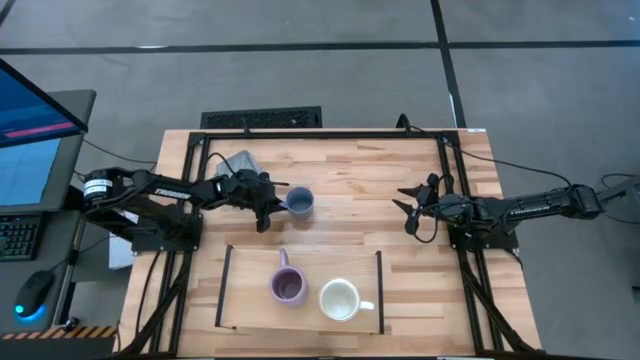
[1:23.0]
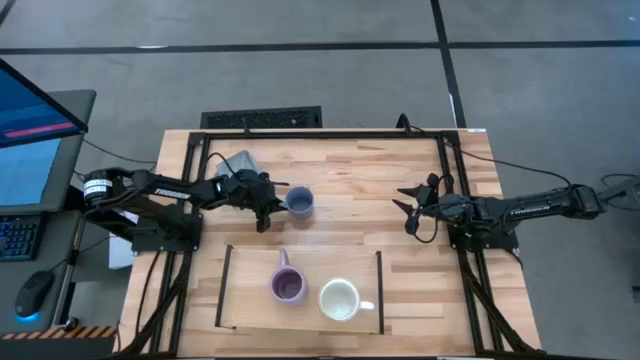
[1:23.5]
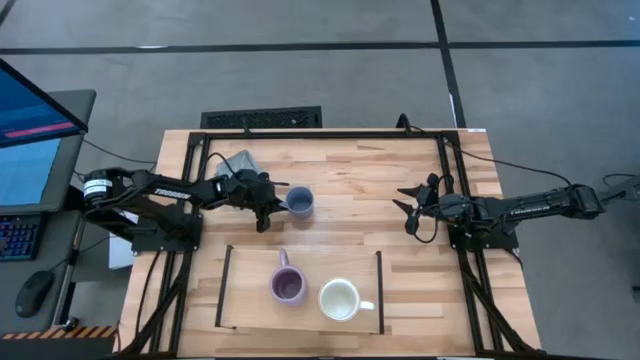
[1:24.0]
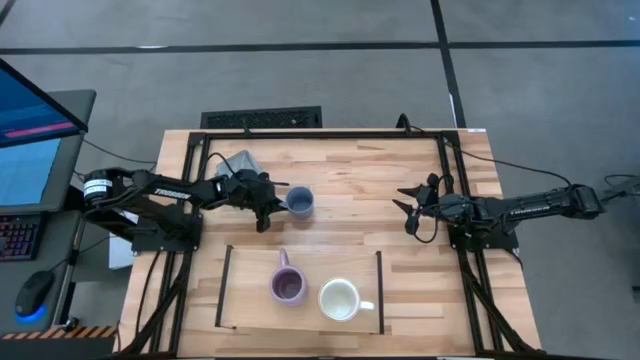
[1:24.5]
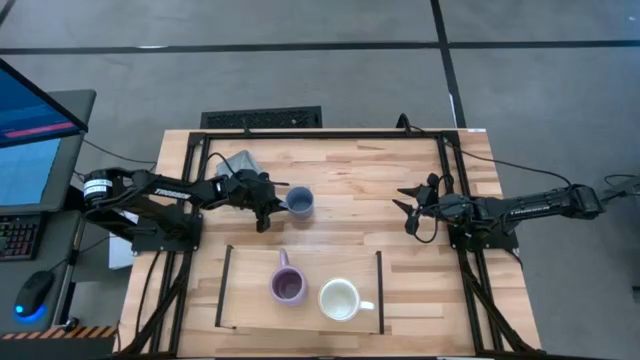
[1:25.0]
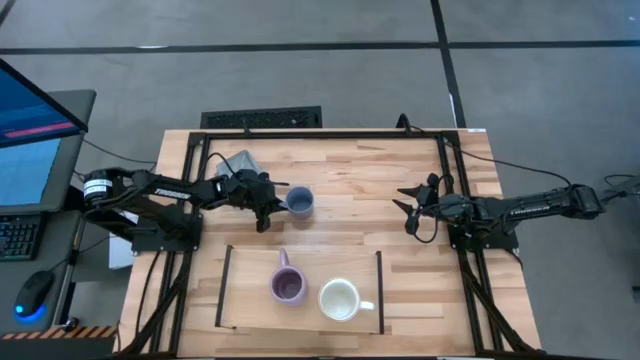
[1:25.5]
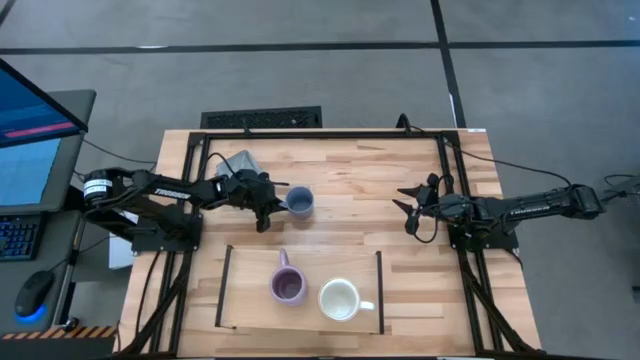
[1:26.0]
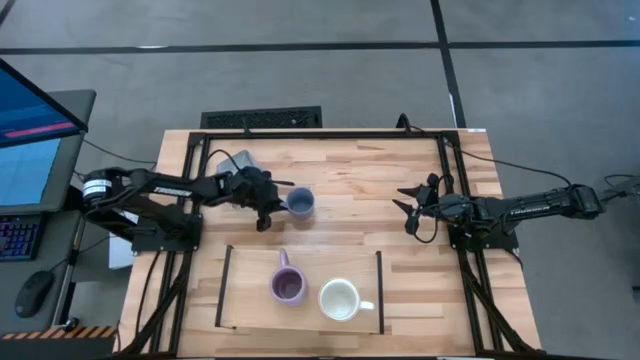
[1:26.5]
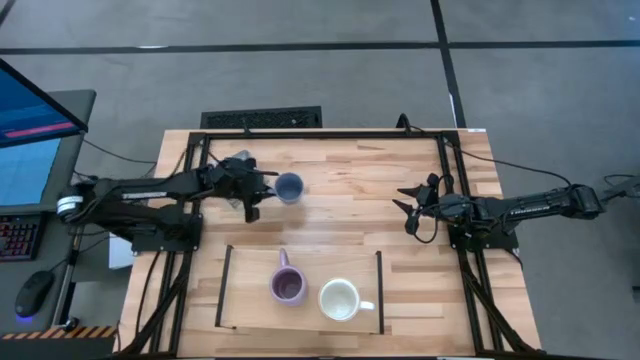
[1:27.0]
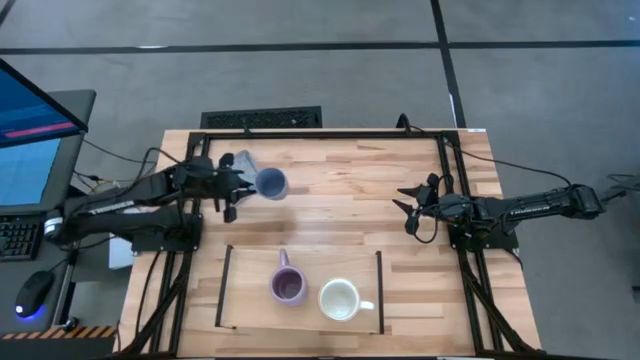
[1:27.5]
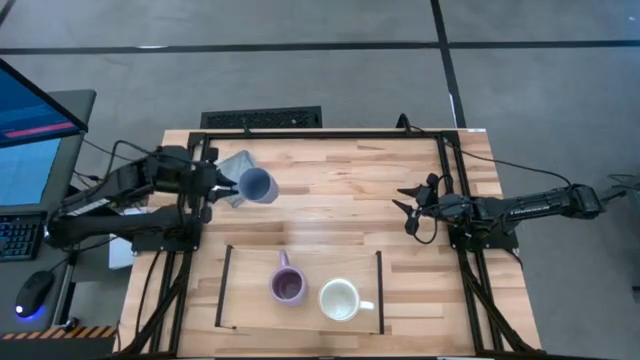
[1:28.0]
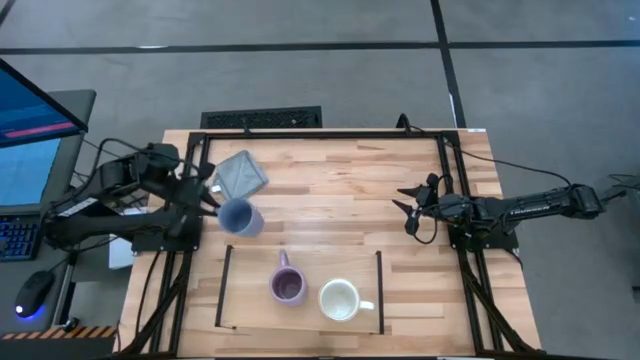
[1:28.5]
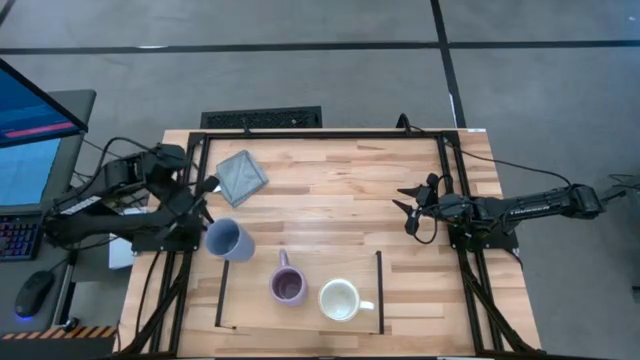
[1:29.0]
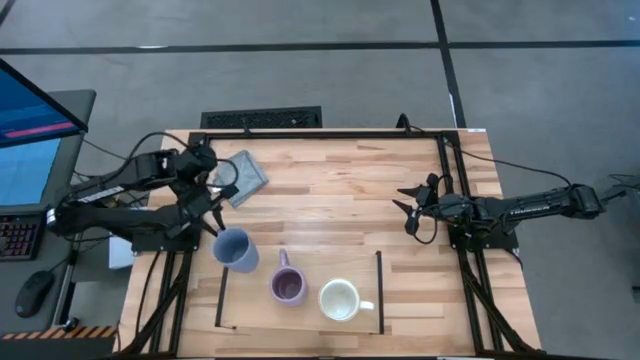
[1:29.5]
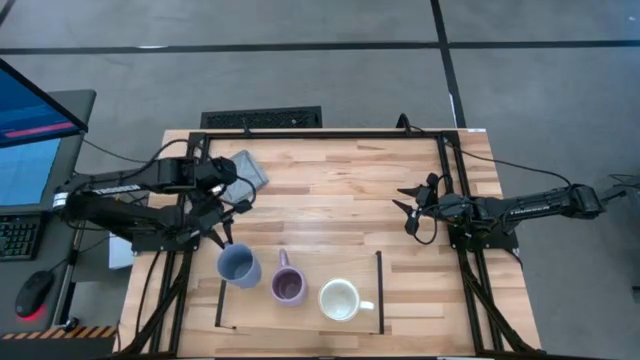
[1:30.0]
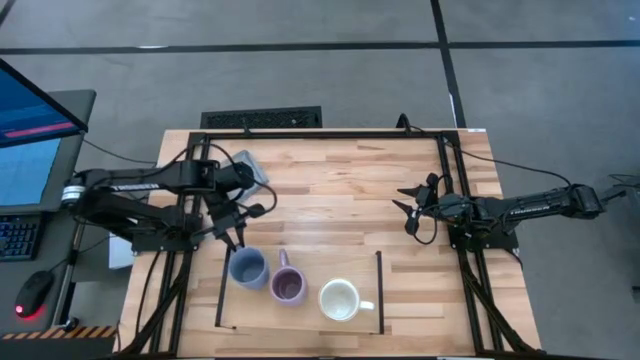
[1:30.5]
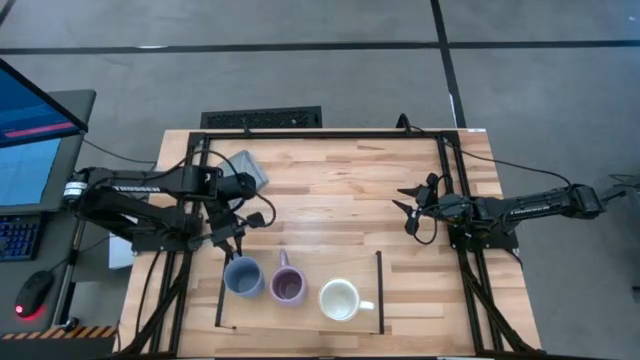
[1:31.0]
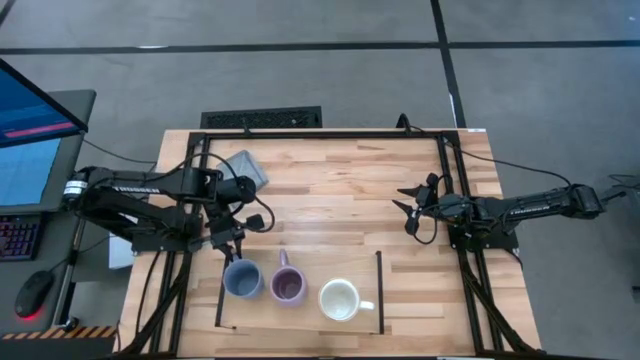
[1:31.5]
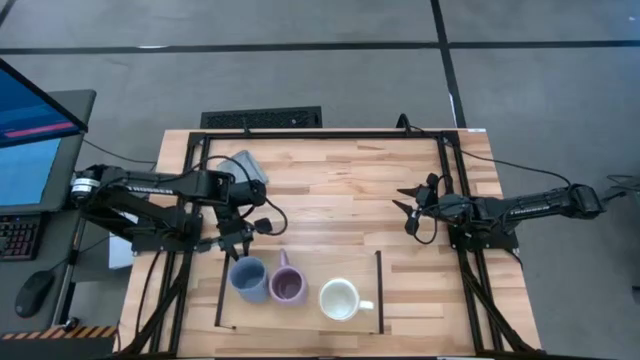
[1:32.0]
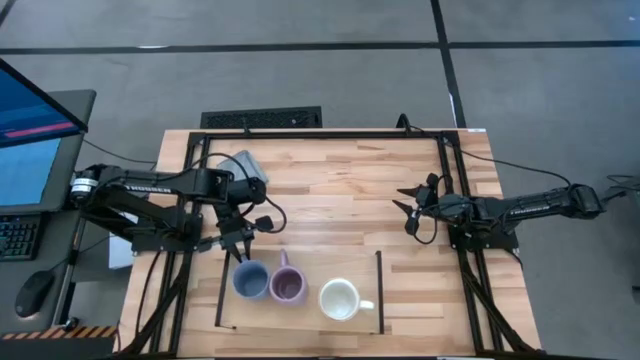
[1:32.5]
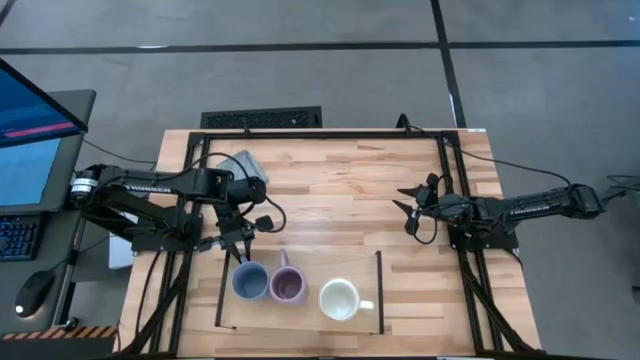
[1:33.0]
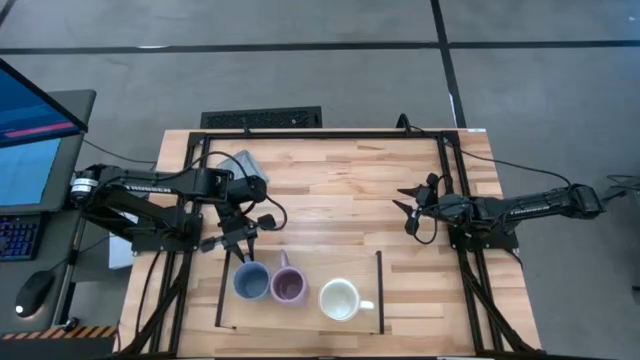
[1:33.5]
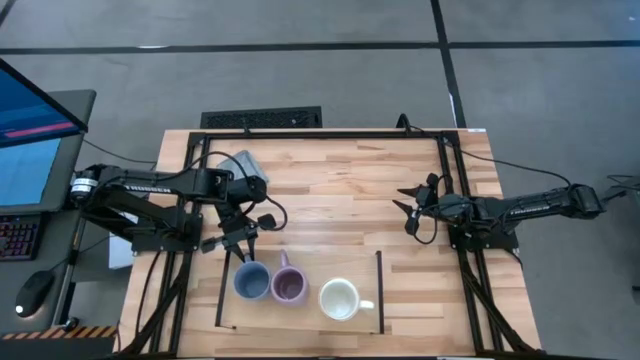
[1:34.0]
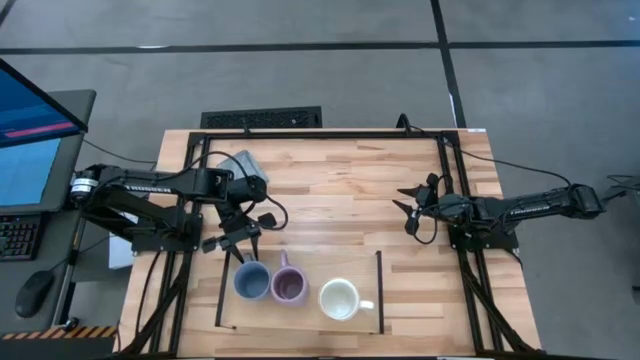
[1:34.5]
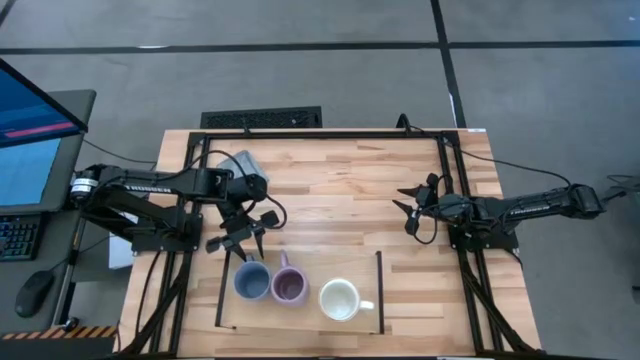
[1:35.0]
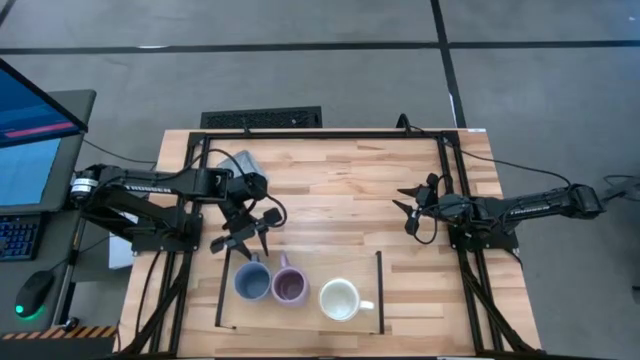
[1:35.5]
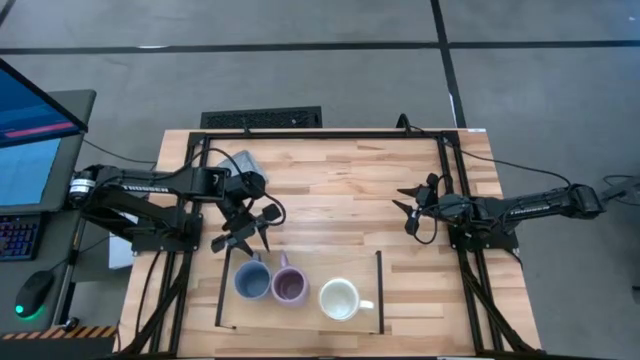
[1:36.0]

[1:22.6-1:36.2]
Task: Stack small to large cups/mugs on shelf
Put the blue mug on the shelf

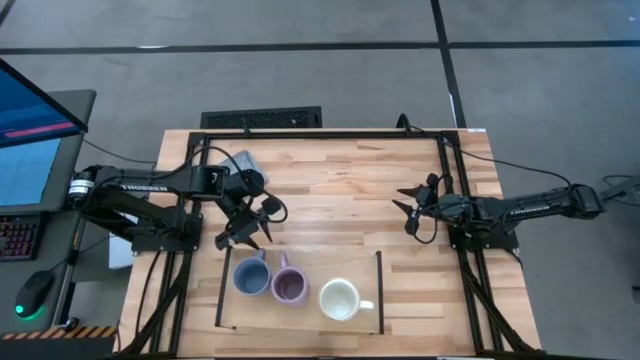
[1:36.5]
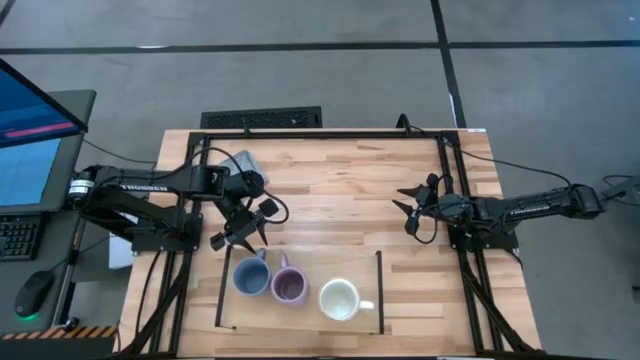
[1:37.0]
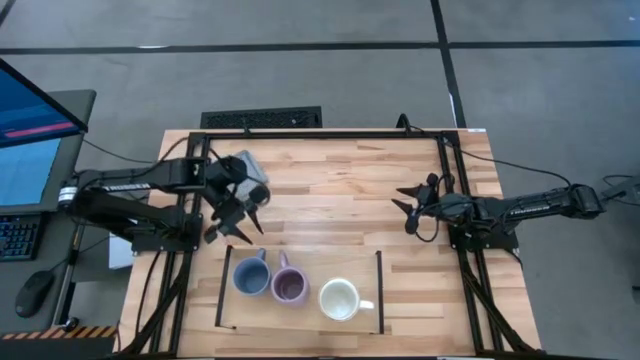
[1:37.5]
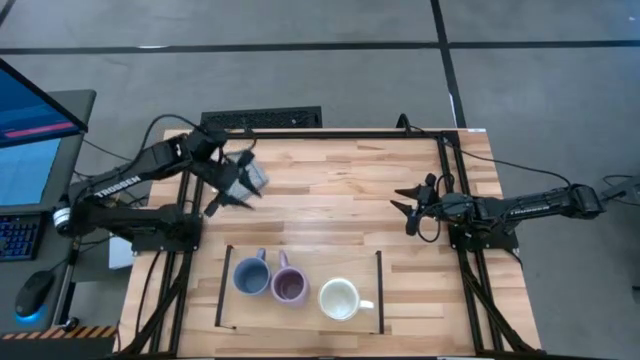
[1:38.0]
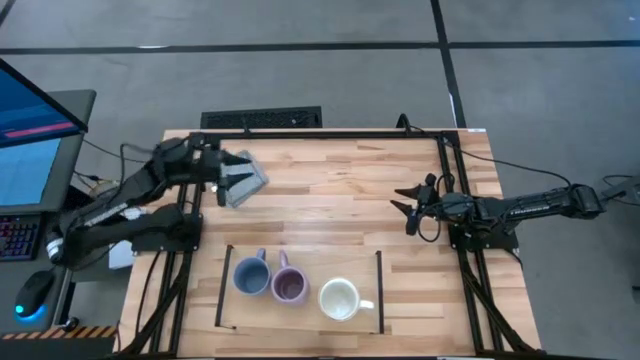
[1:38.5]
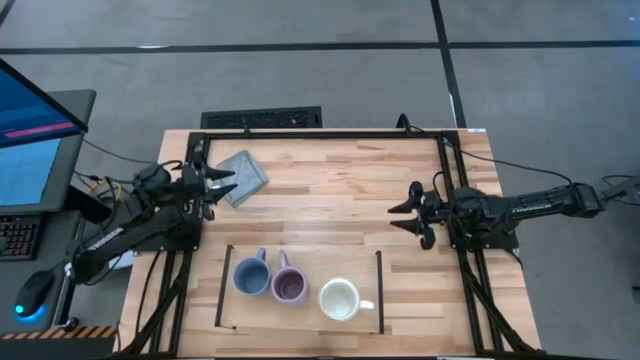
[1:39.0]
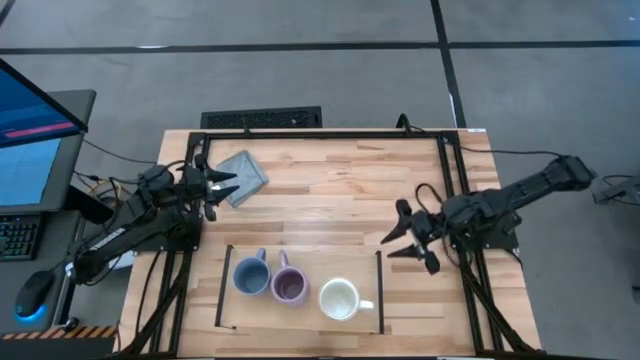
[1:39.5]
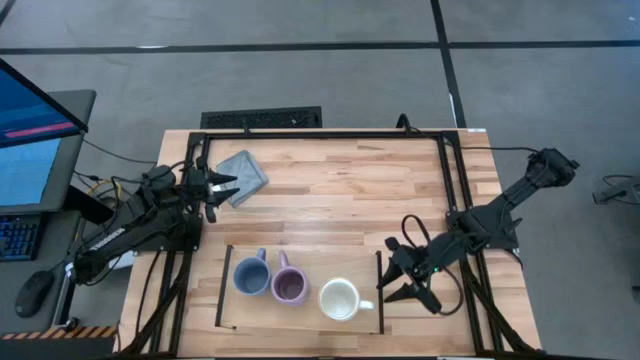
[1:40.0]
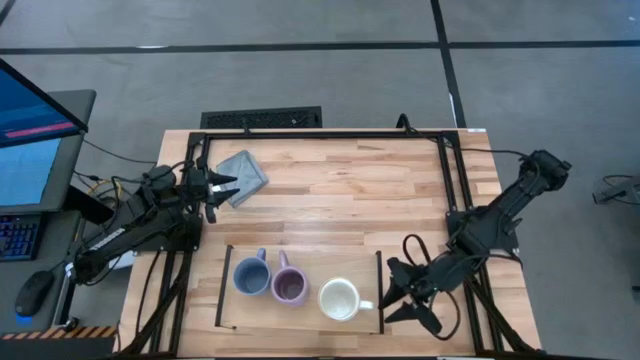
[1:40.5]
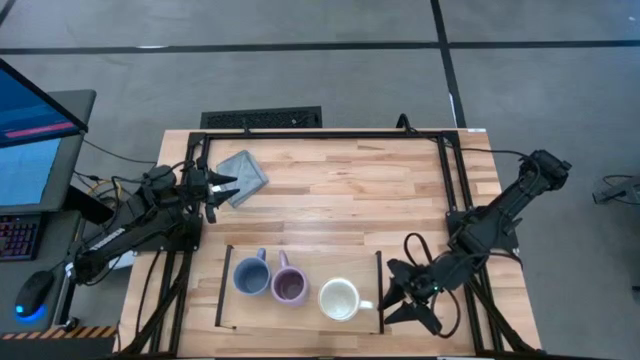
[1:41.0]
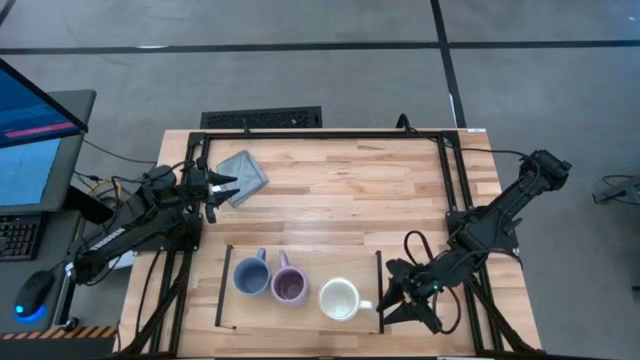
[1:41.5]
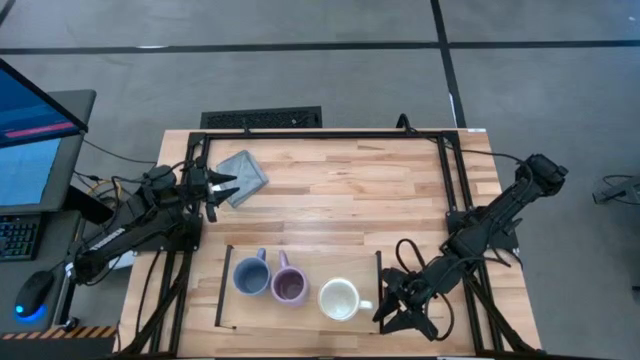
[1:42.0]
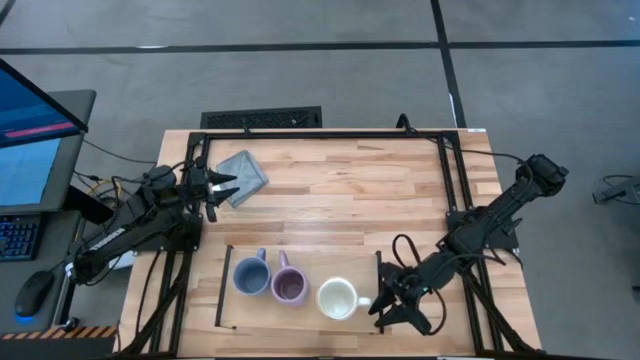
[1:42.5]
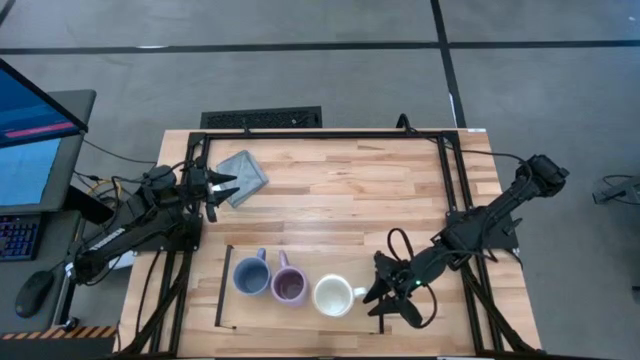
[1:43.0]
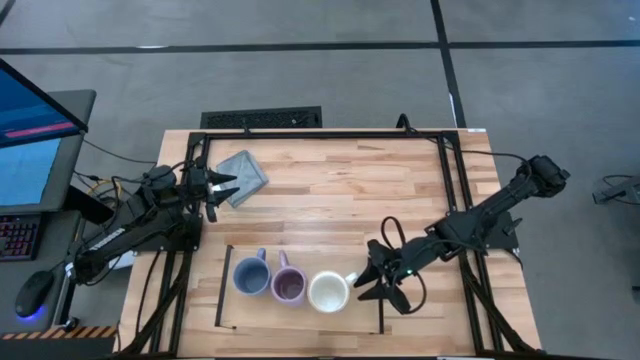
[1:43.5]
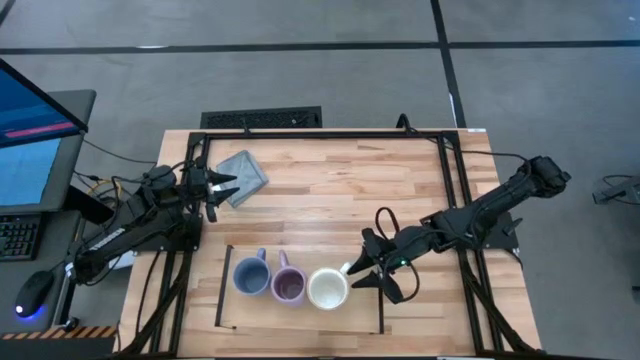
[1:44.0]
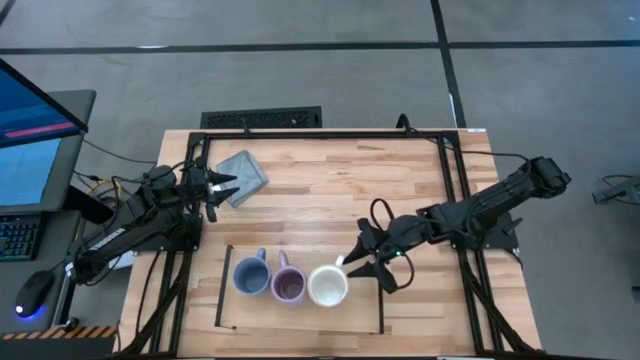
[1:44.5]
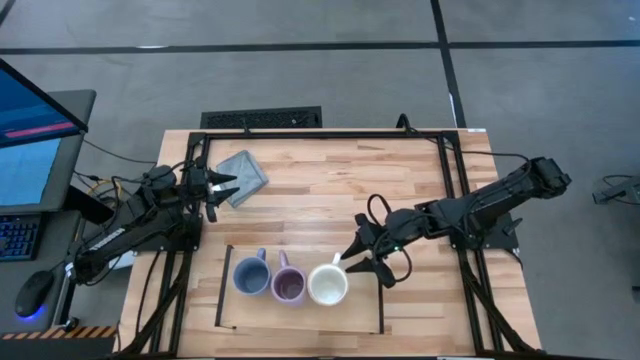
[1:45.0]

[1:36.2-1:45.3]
Adjust the green mug on the shelf
